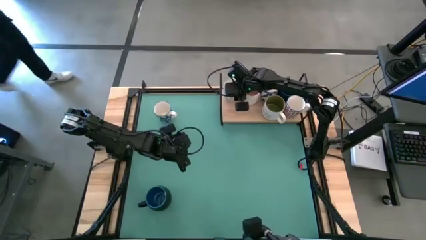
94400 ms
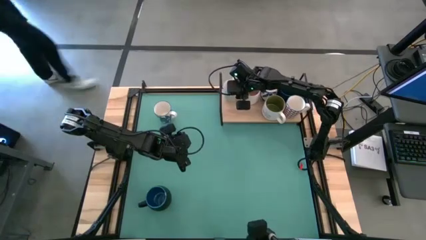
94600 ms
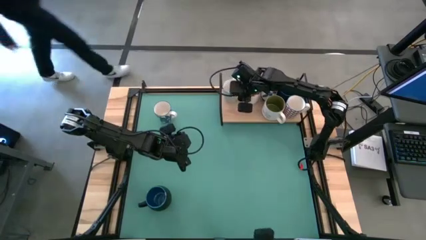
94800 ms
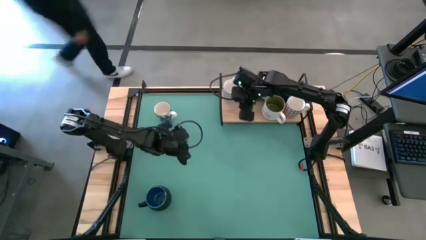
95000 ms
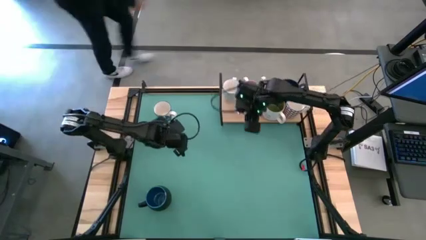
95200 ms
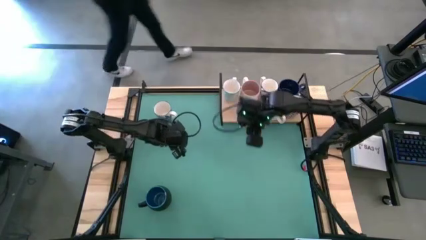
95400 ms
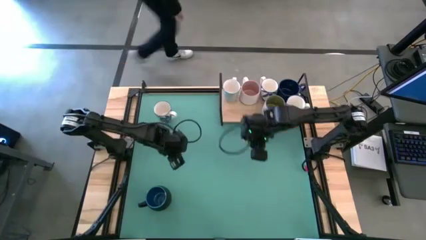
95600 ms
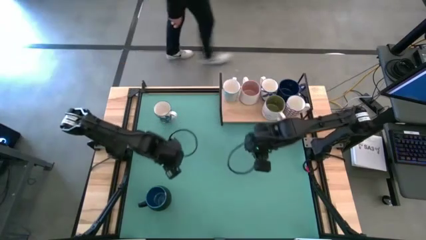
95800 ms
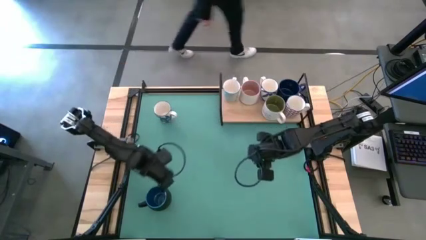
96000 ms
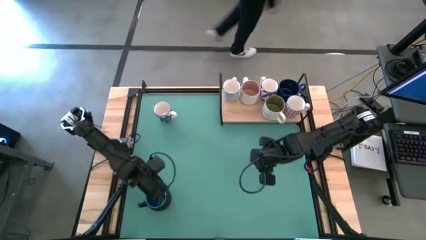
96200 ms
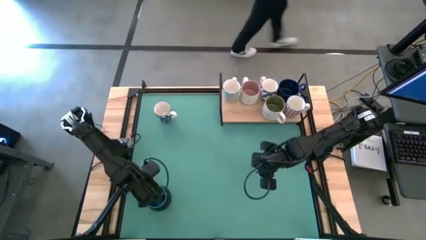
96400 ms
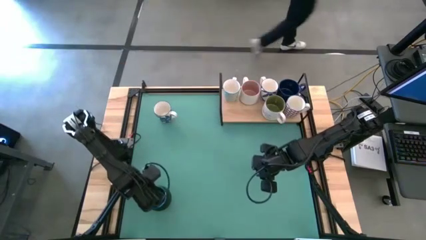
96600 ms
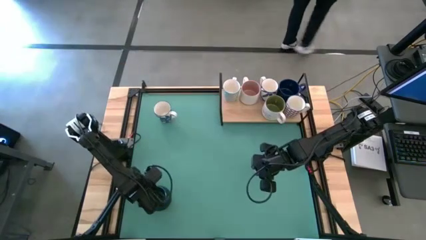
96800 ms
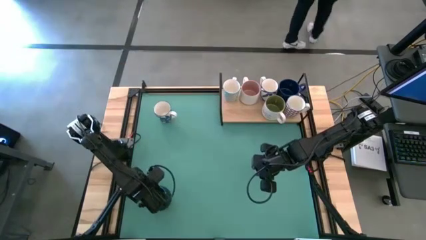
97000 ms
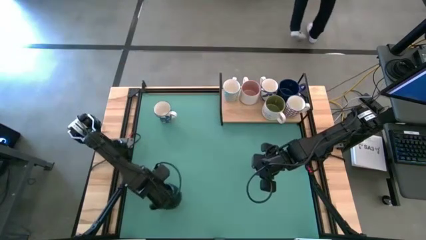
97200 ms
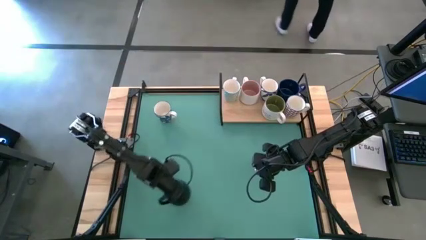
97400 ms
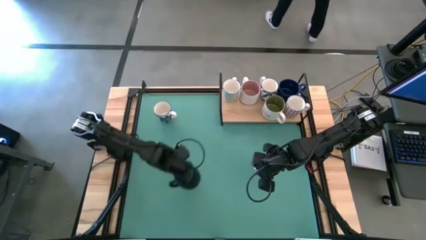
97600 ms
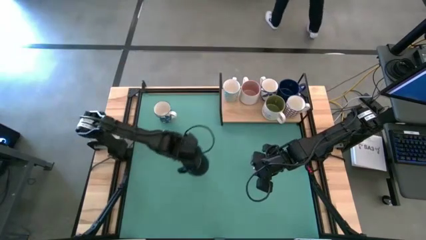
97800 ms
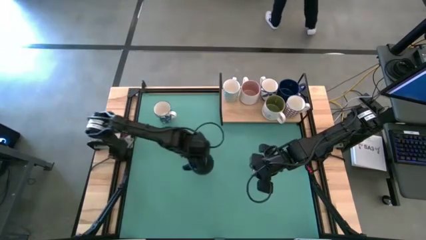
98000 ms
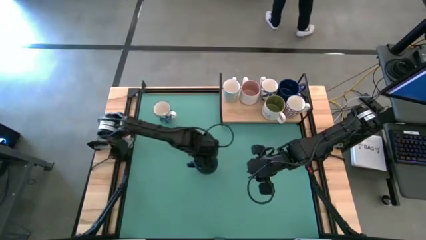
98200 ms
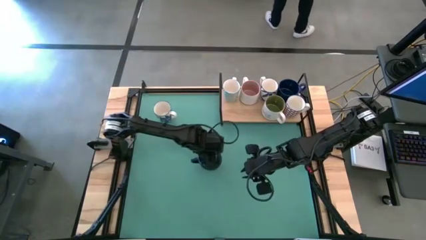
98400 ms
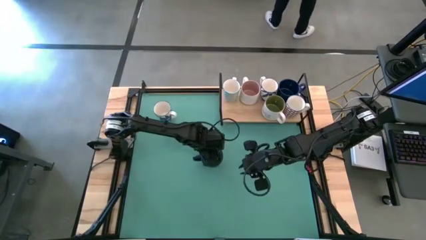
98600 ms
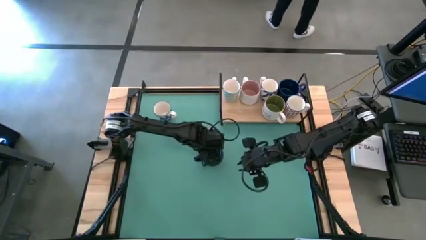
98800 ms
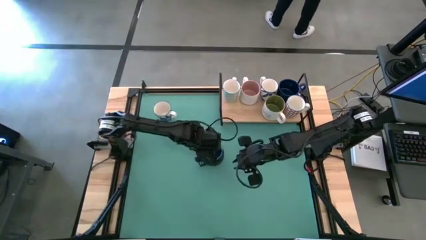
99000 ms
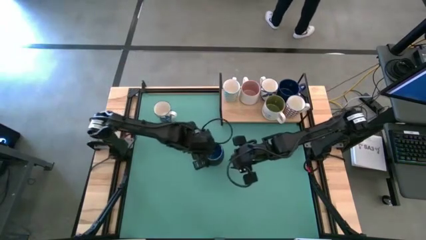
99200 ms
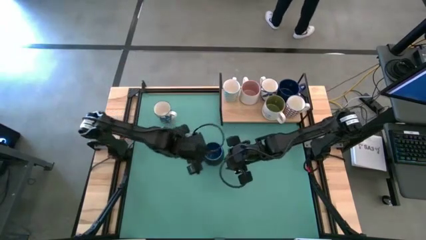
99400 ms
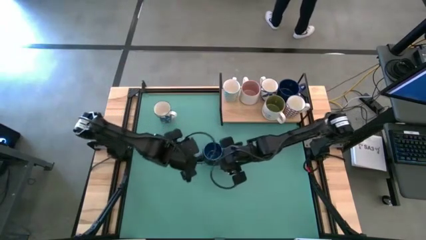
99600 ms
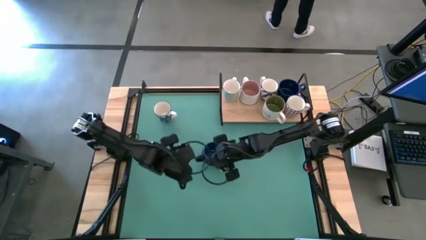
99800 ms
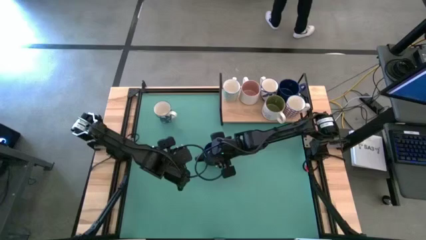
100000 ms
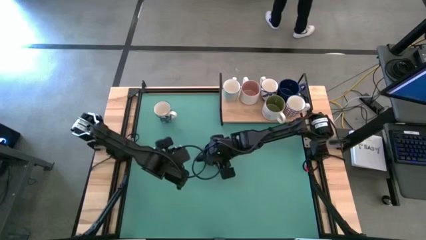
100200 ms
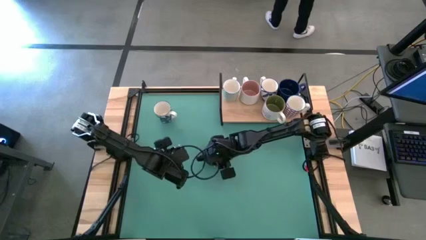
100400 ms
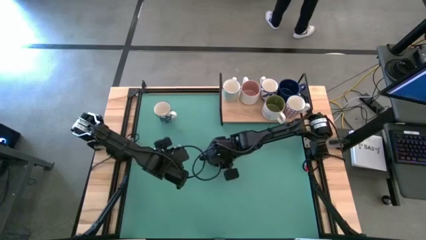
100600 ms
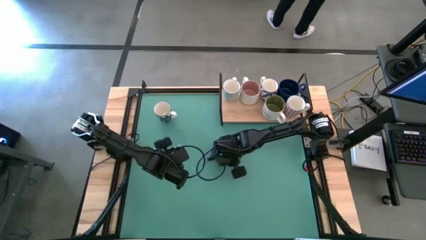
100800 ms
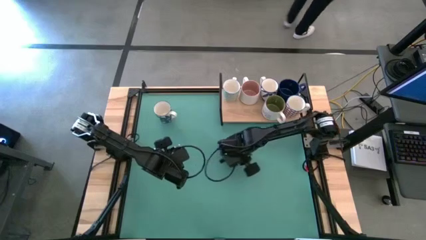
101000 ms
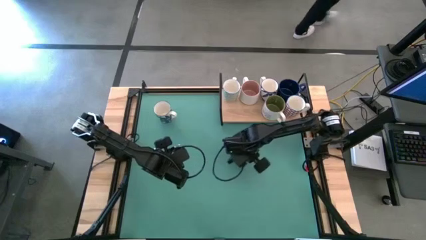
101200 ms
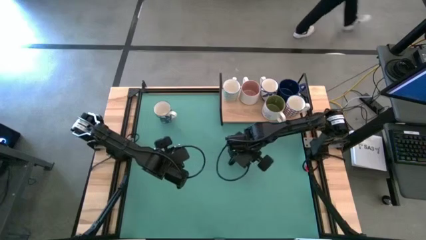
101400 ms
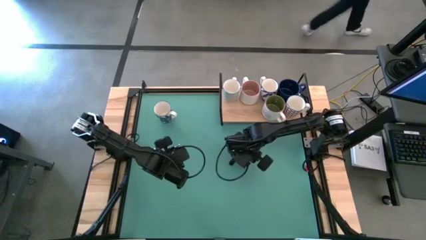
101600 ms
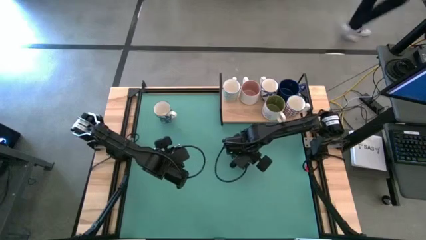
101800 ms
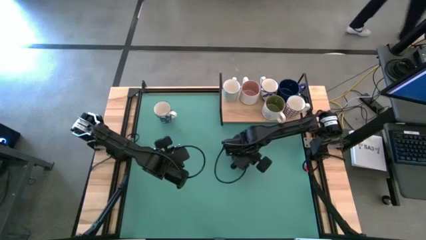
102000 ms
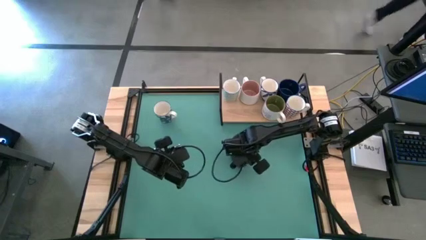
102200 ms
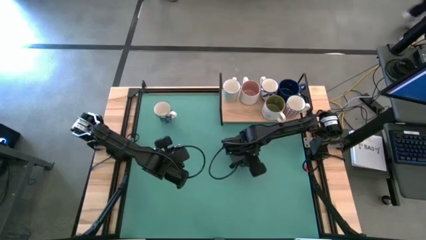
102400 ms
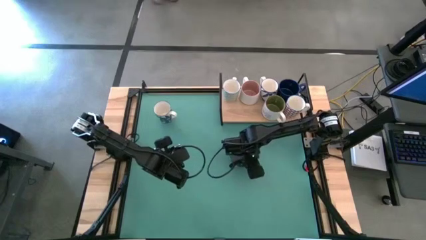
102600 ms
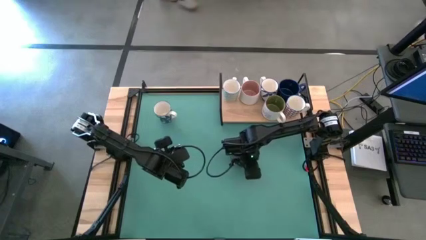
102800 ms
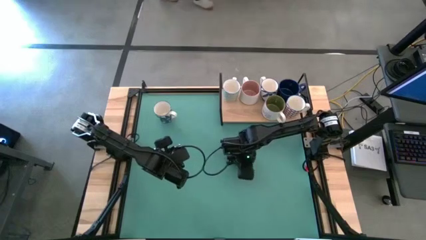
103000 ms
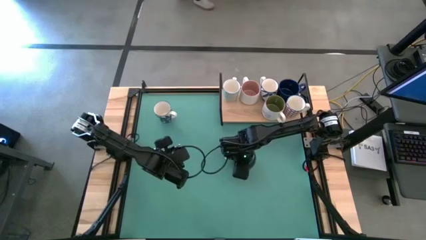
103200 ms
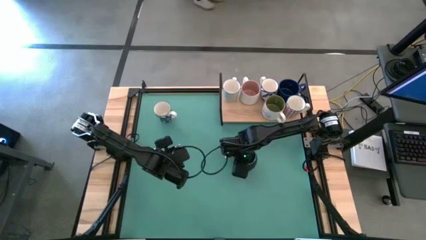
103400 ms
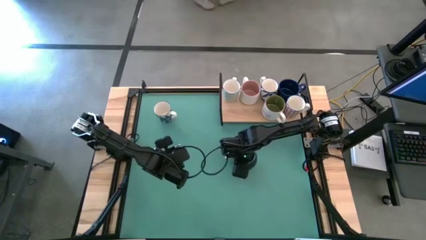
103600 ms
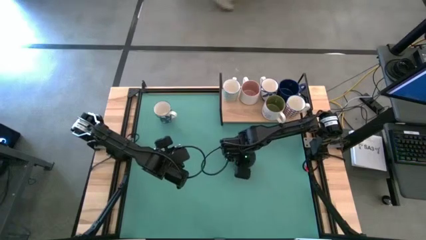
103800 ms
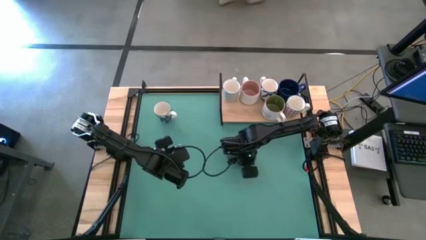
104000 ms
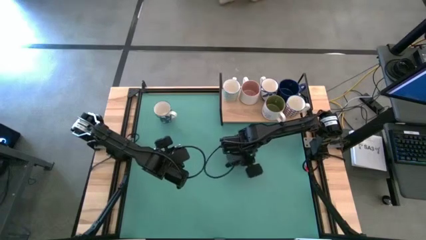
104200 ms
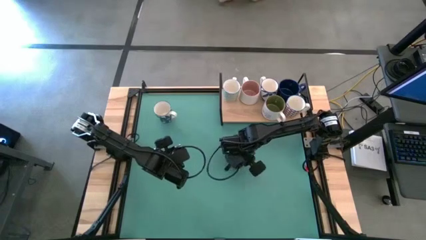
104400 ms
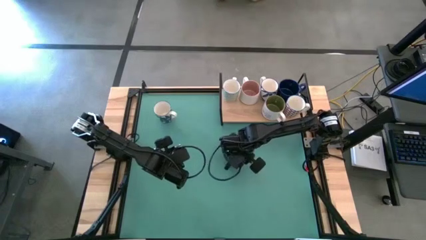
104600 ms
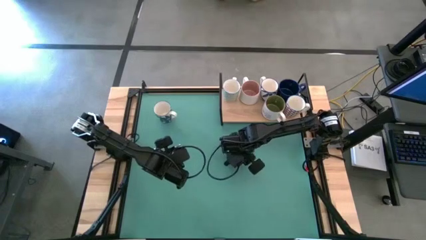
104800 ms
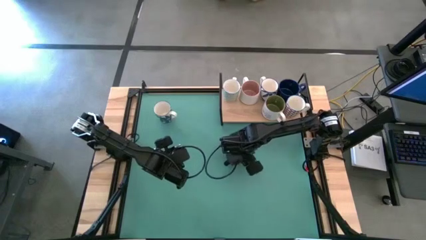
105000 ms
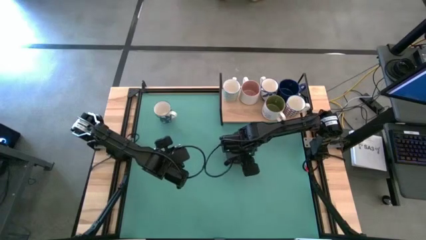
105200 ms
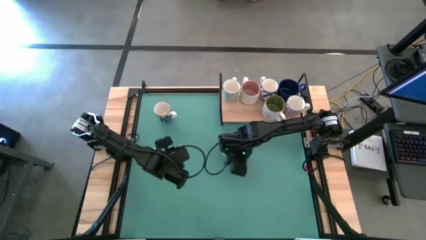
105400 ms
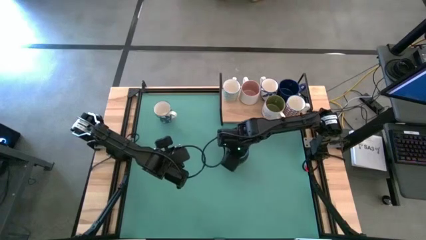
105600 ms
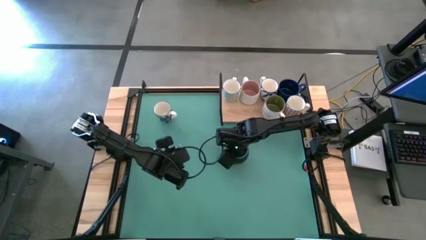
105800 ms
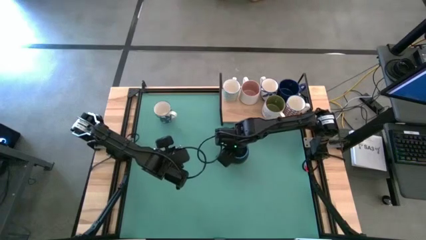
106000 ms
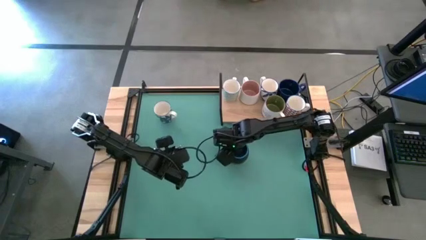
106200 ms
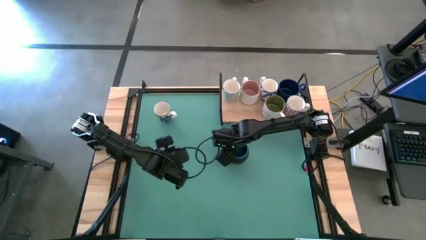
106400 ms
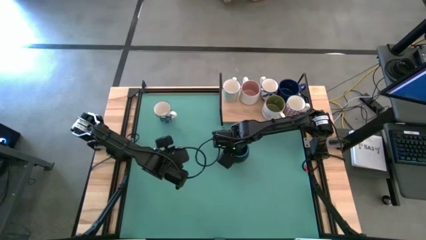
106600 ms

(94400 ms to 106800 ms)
Task: Place coffee mugs
Put the black blue mug on the shelf
